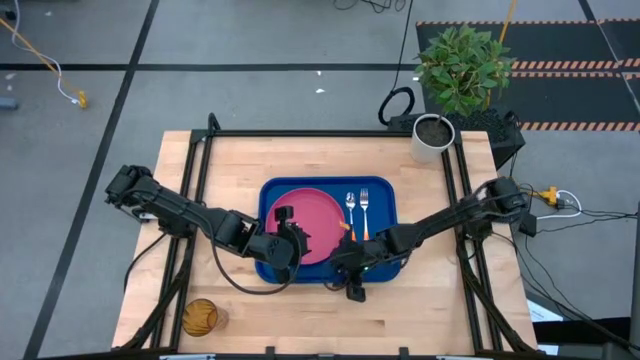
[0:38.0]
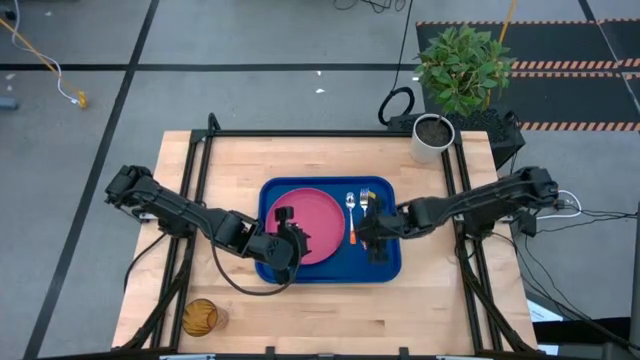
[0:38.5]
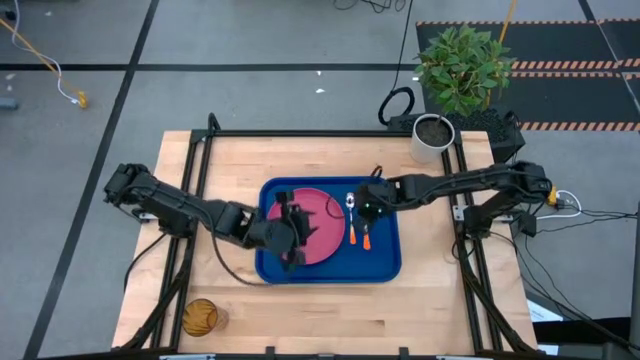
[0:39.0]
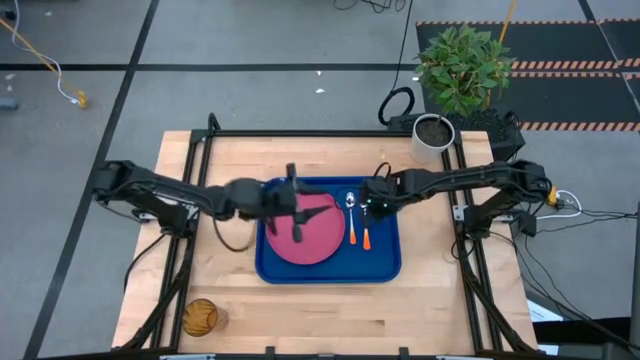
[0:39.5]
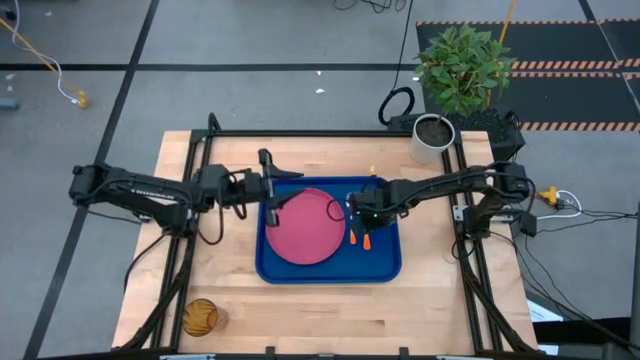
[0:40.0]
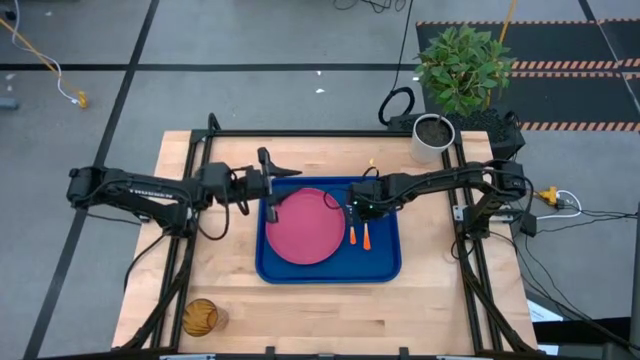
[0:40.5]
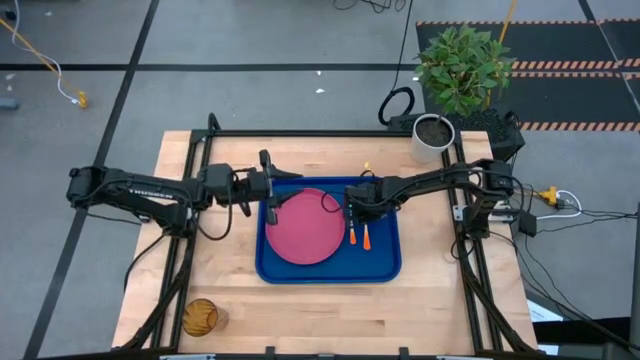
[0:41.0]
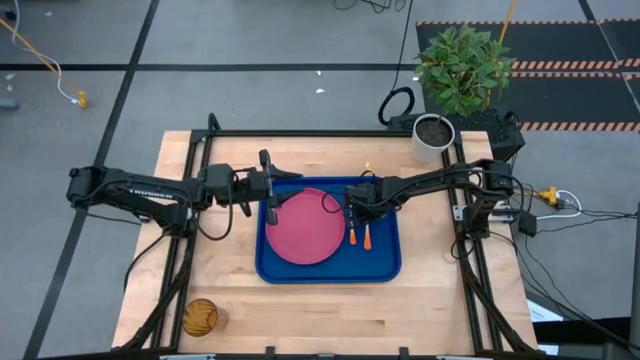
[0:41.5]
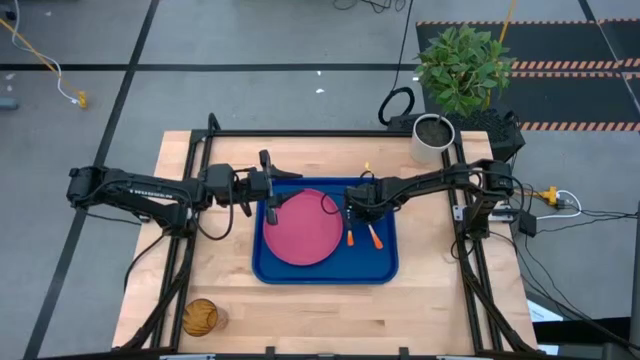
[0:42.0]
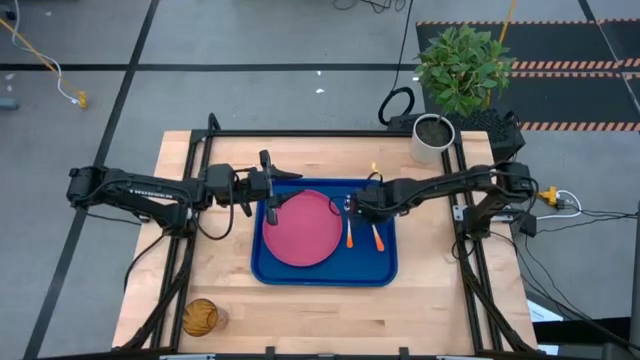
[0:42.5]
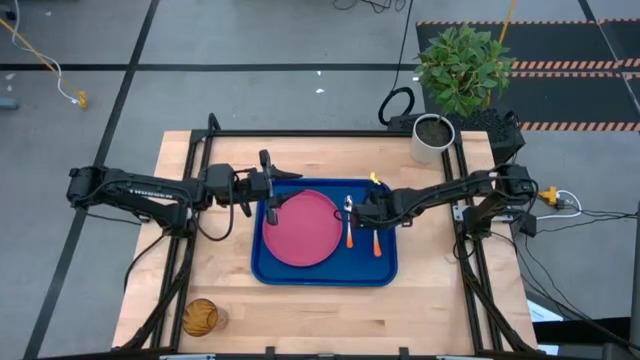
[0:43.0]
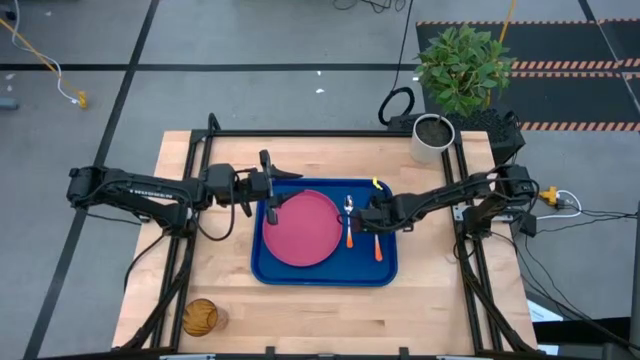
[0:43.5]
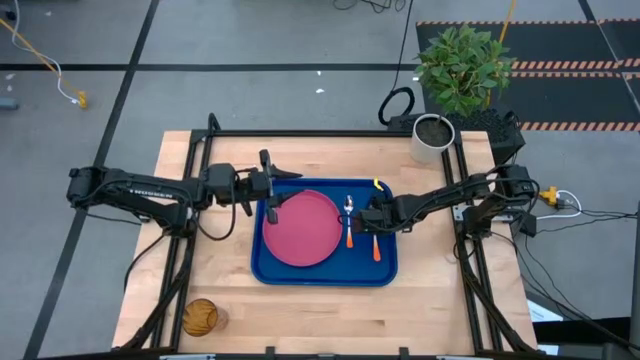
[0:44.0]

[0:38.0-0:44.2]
Task: Pick and place plate/cup/fork/spoon on tray
Adjust the fork

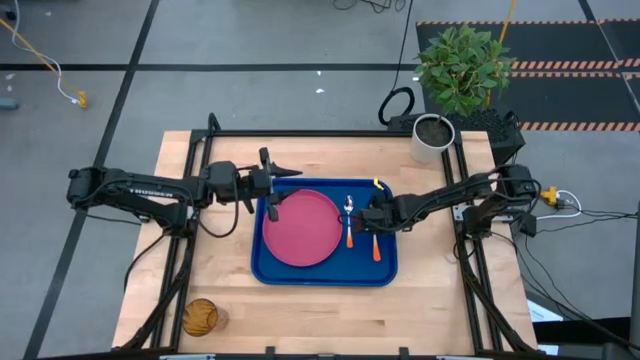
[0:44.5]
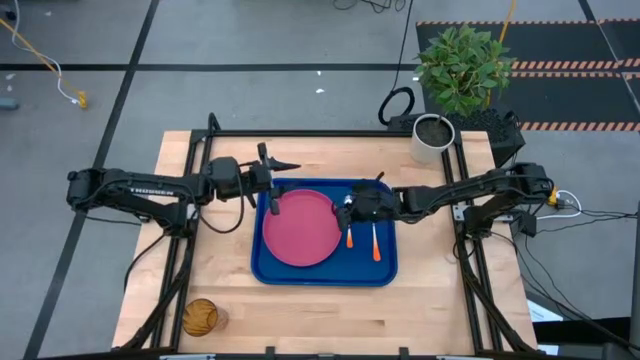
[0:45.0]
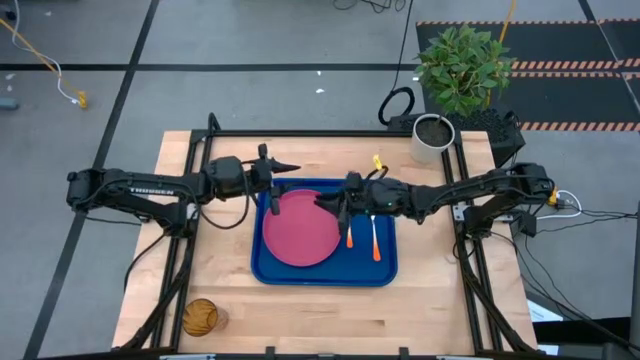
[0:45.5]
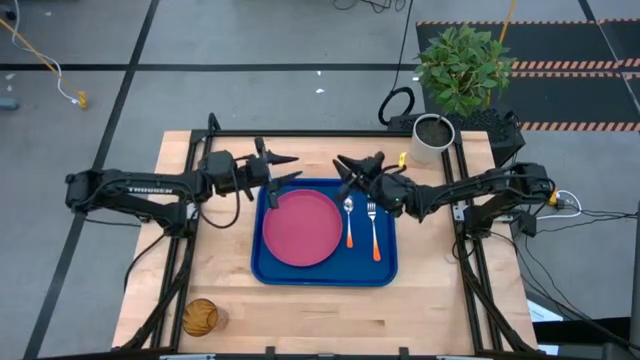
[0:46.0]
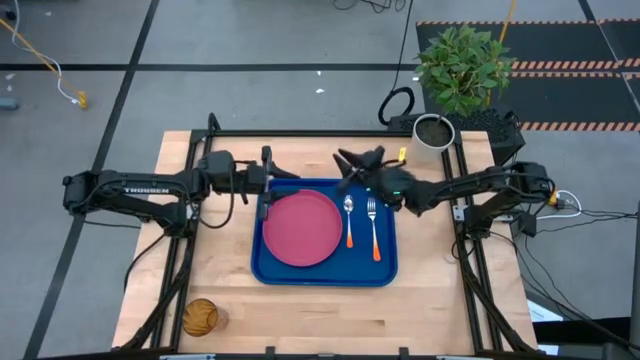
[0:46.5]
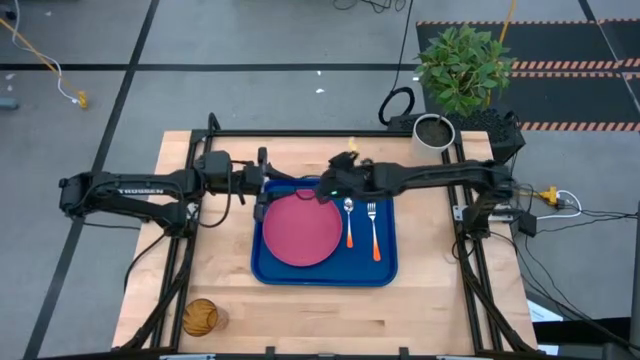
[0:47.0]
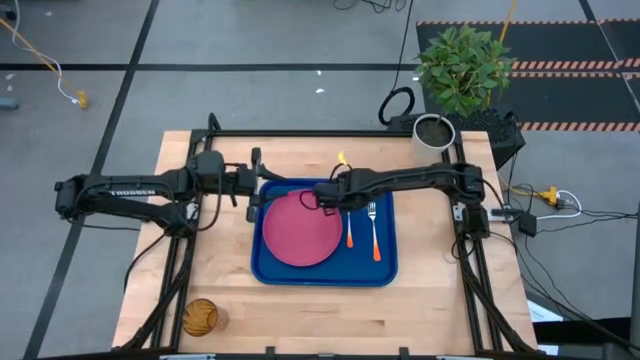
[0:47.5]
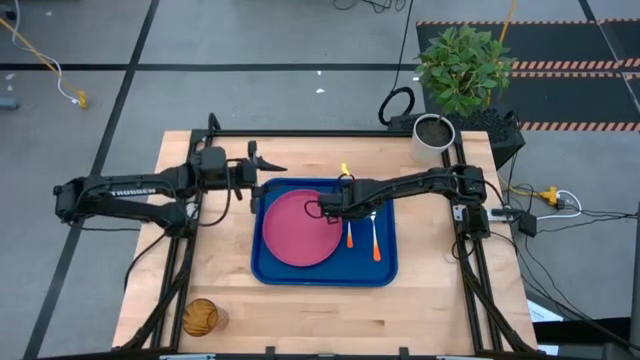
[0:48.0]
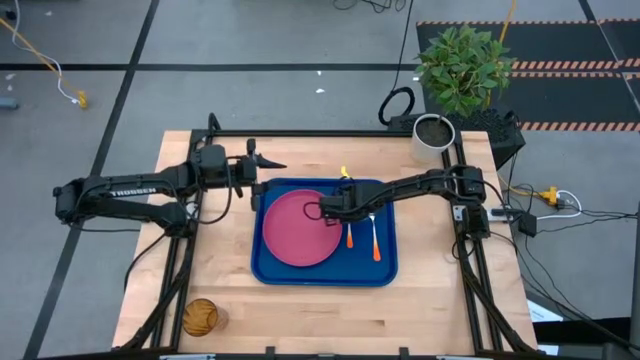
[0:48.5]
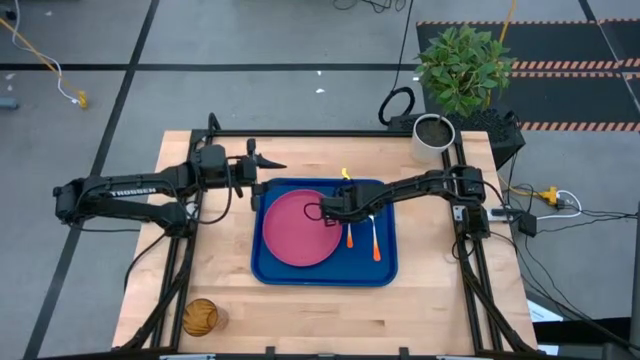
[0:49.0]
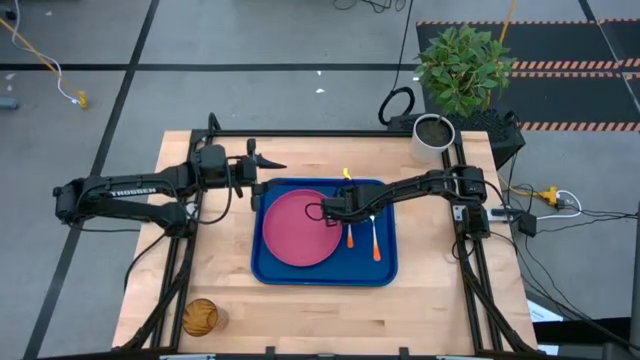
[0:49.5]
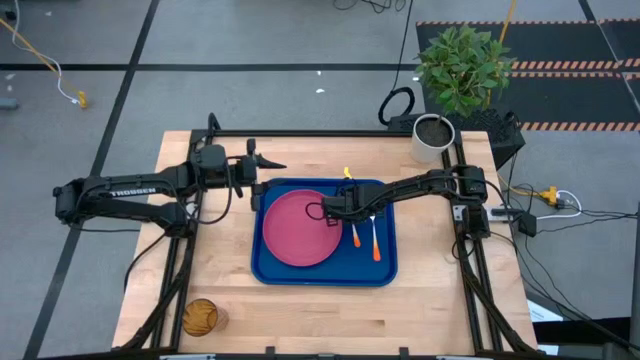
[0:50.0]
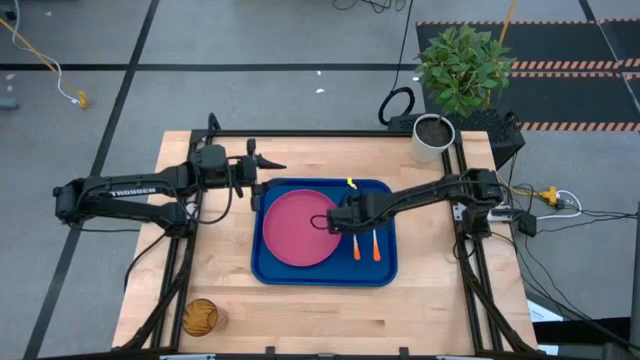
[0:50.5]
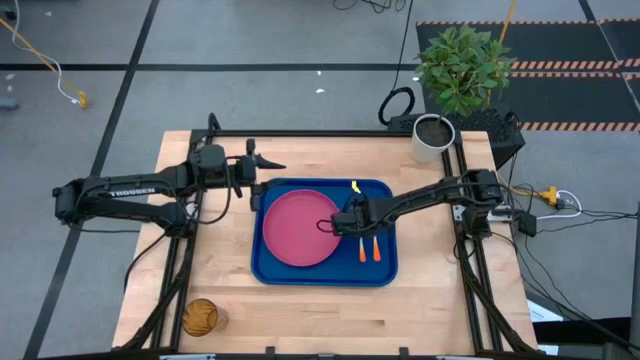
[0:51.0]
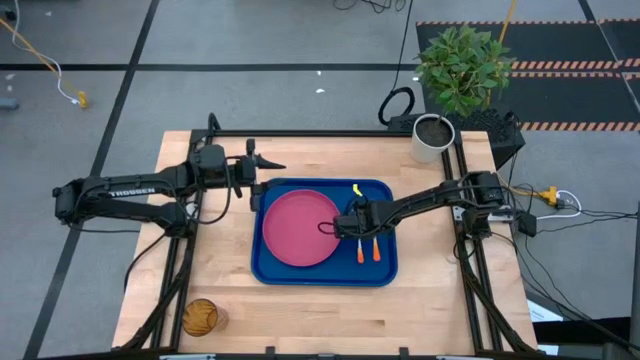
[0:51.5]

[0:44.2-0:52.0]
Adjust the spoon

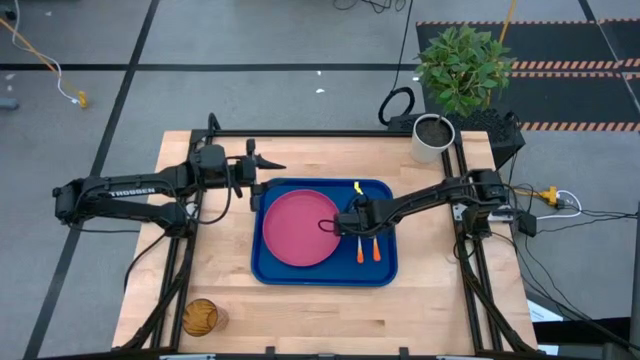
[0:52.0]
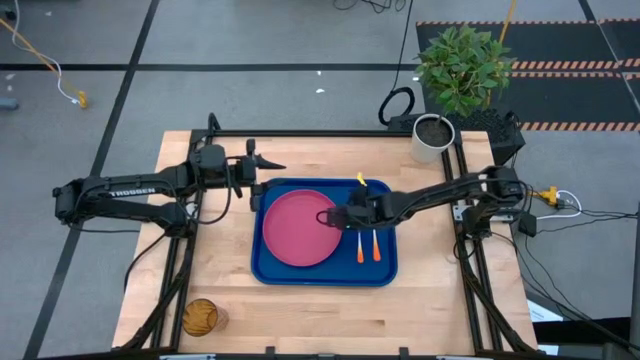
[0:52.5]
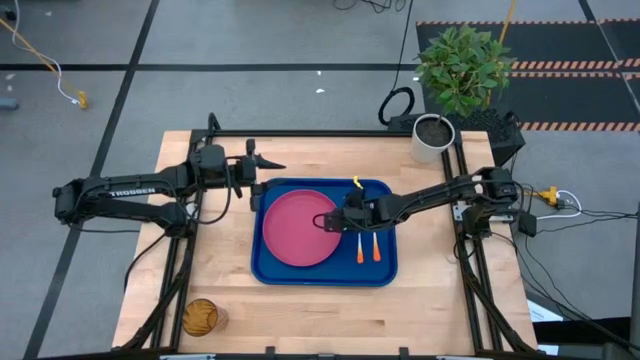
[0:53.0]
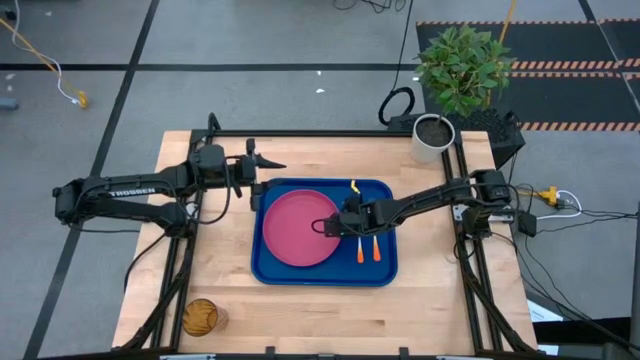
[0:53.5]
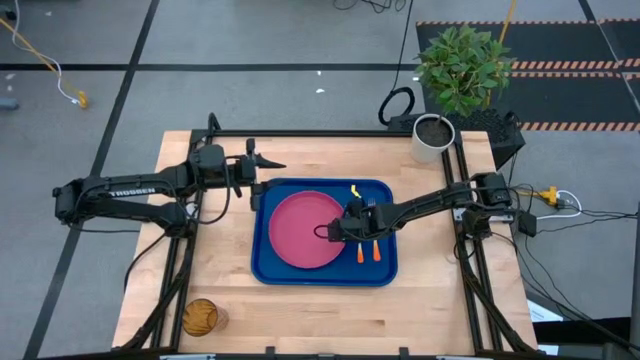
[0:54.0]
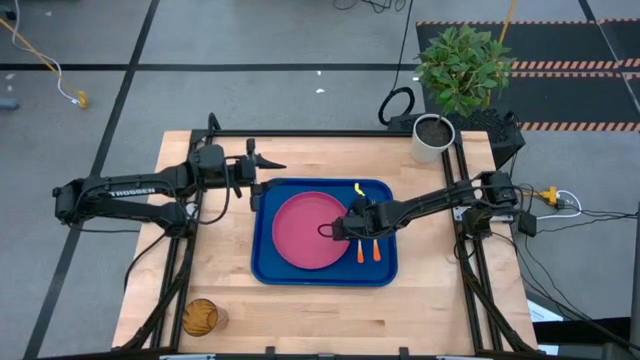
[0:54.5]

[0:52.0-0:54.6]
Adjust the pink plate

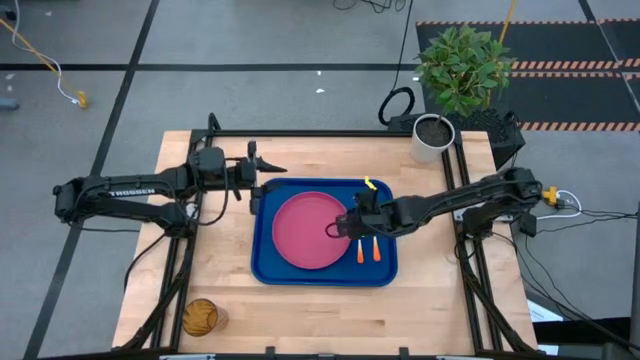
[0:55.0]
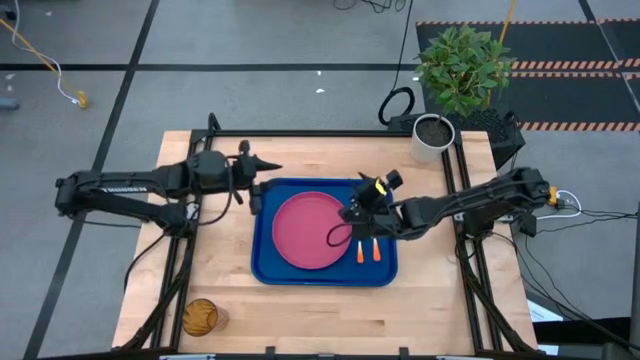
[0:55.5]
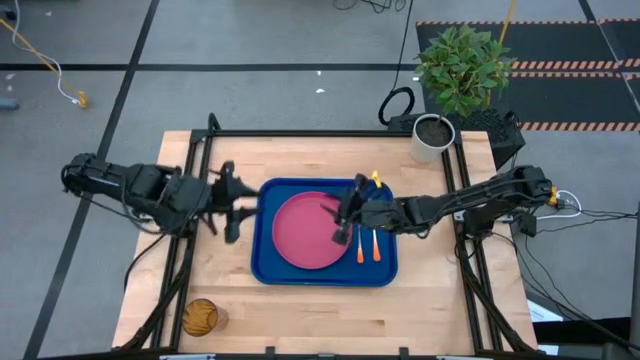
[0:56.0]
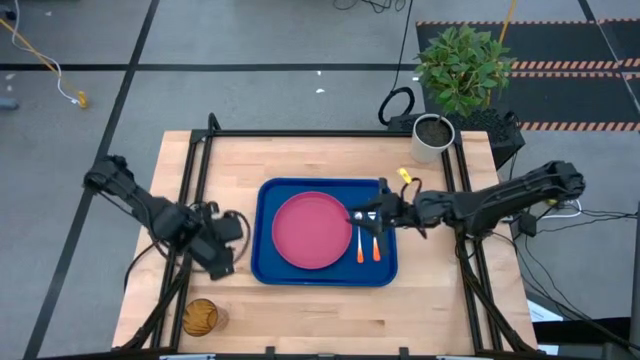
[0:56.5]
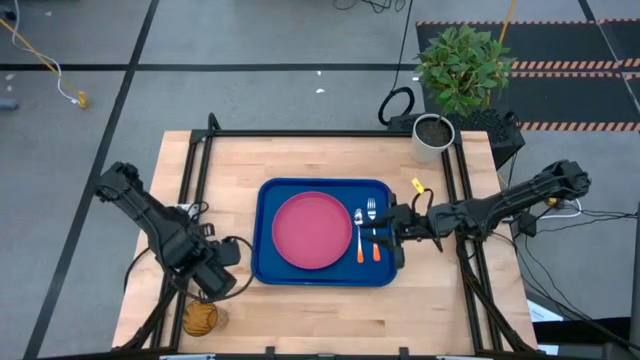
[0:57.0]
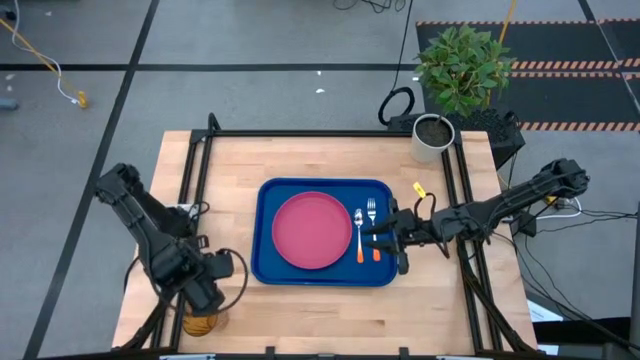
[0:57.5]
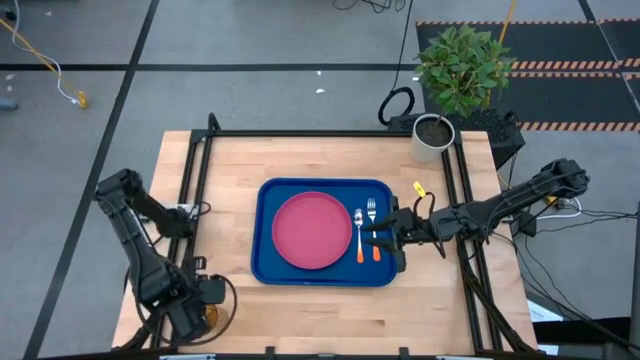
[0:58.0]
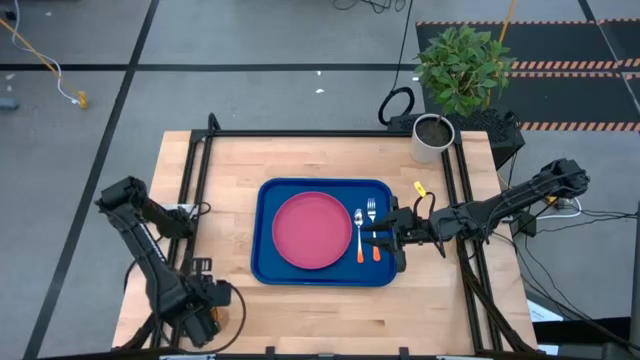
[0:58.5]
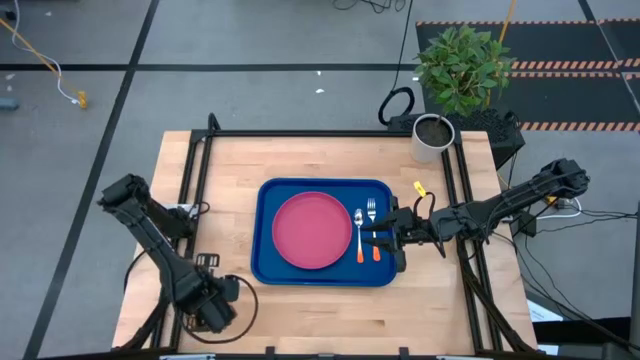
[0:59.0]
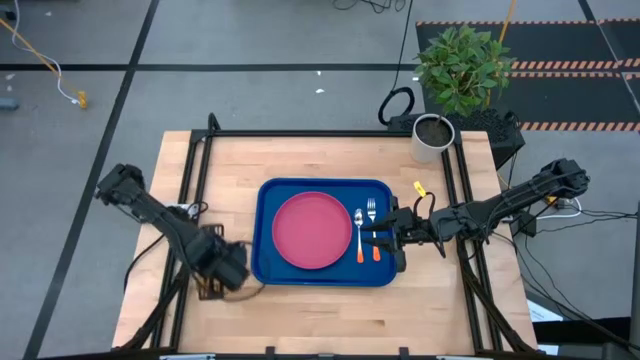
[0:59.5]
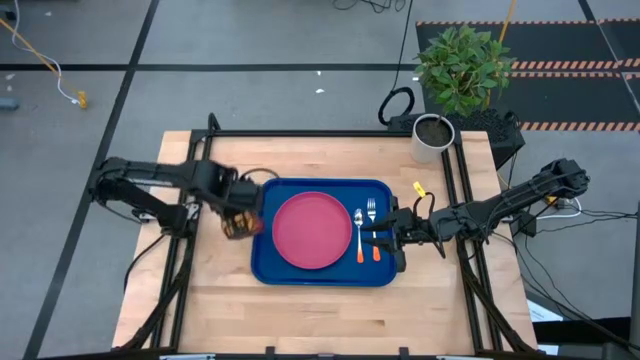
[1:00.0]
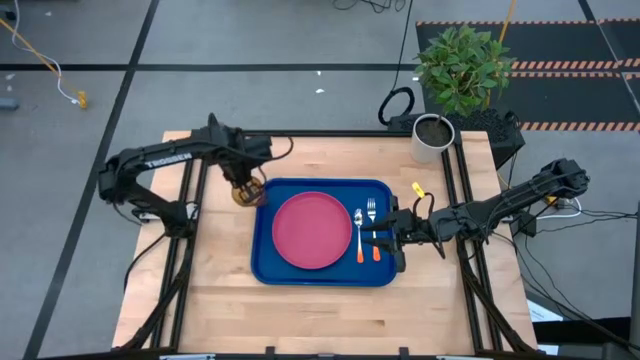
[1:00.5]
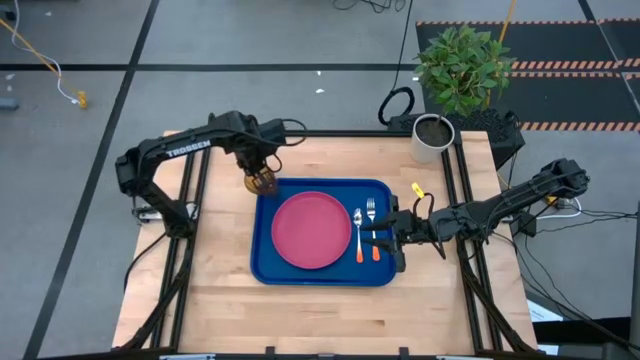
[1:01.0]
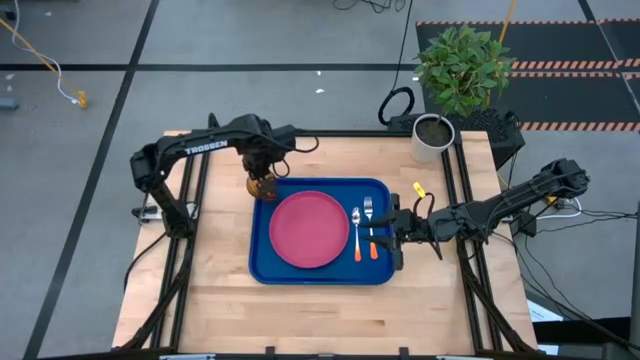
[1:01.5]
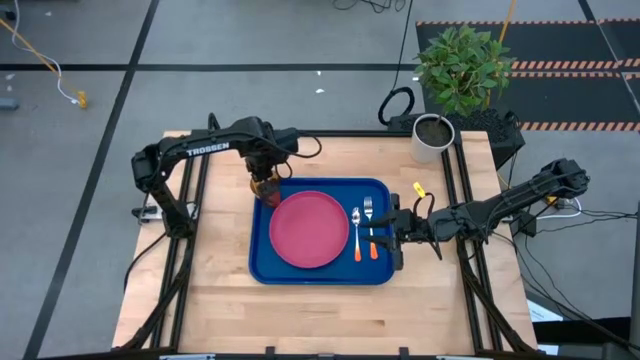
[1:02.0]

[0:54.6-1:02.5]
Put the cup on the top left of the blue tray
